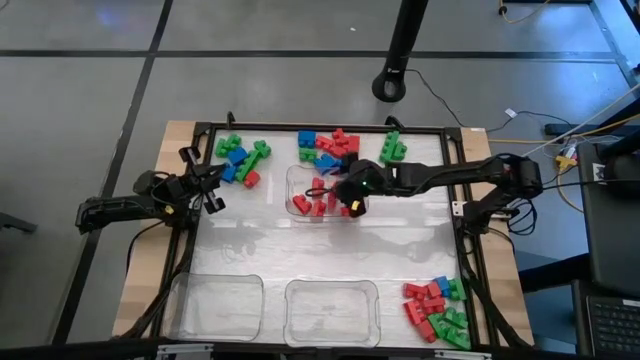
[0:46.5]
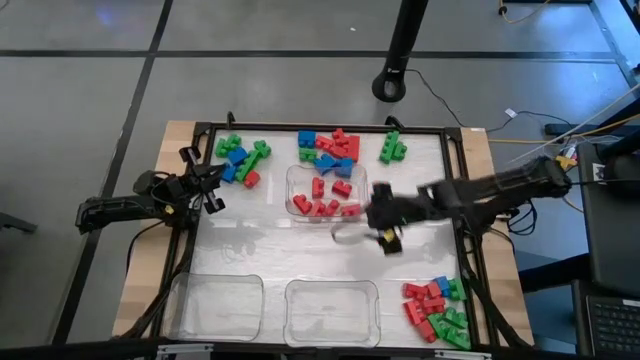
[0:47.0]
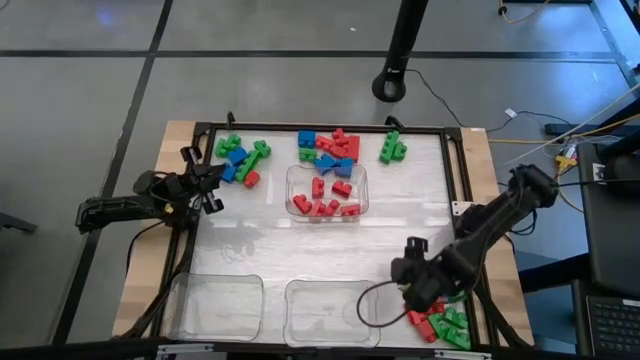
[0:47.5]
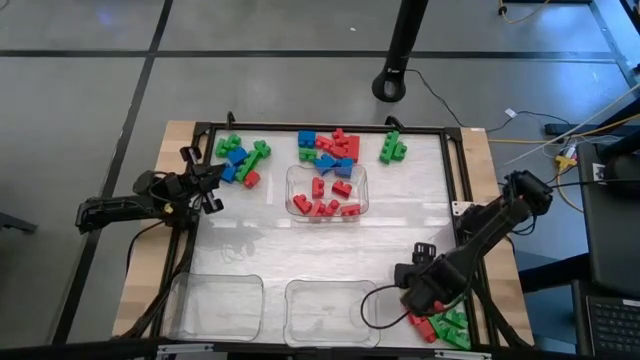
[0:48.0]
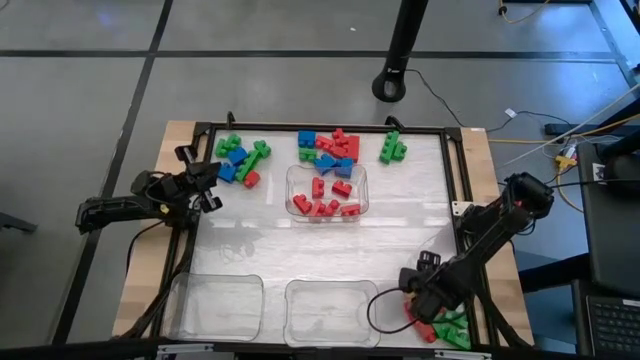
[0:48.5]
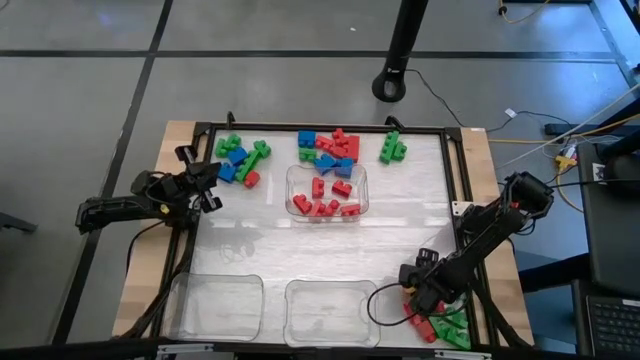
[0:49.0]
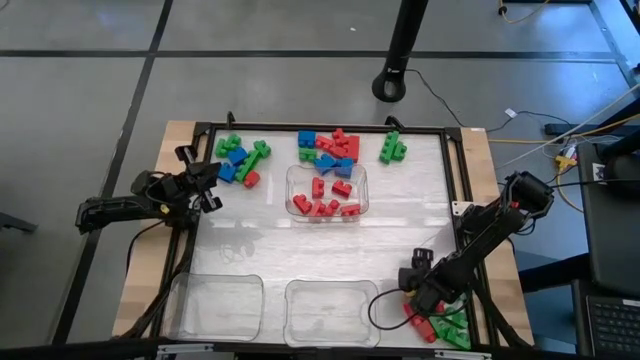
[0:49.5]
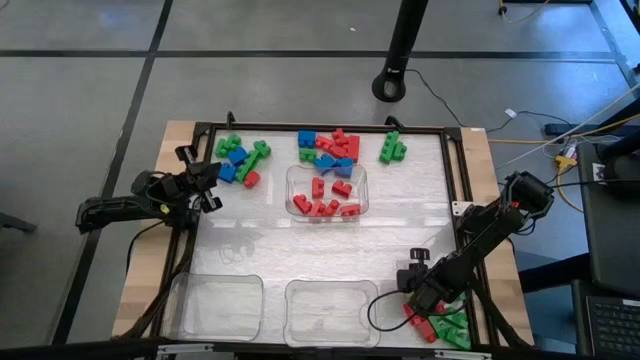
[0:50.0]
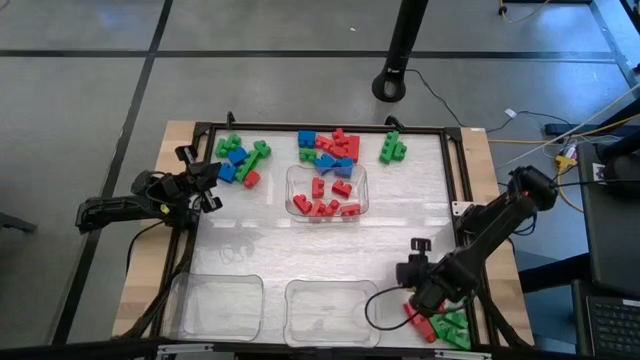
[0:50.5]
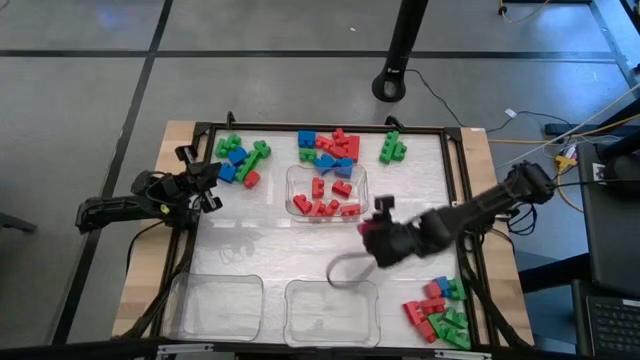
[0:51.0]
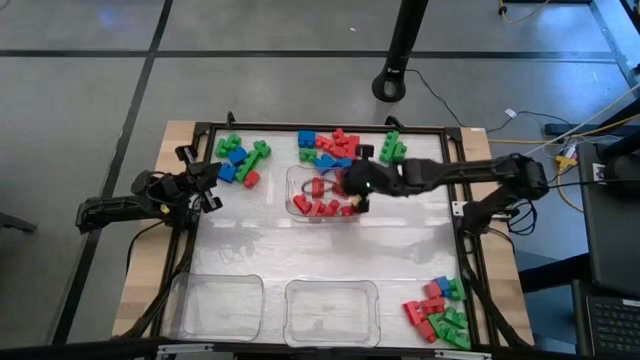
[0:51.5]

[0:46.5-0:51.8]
Task: Sort blocks
Put the red game piece into the top right transparent bin

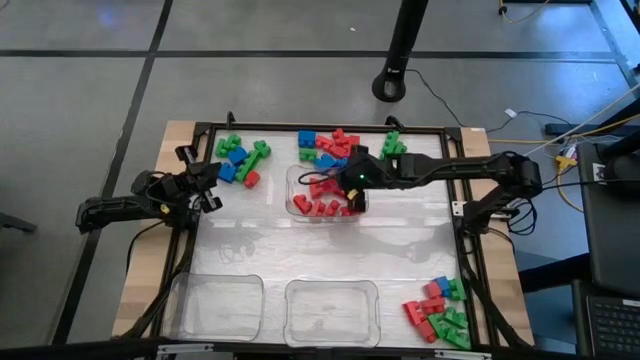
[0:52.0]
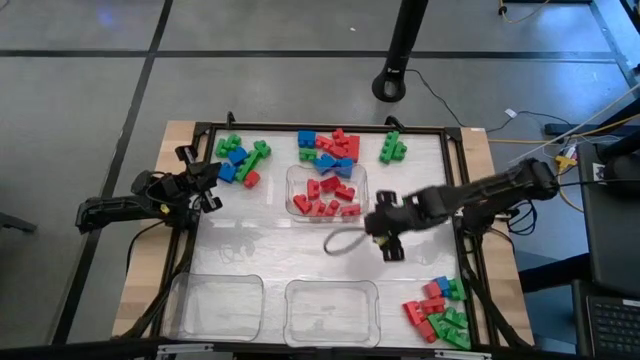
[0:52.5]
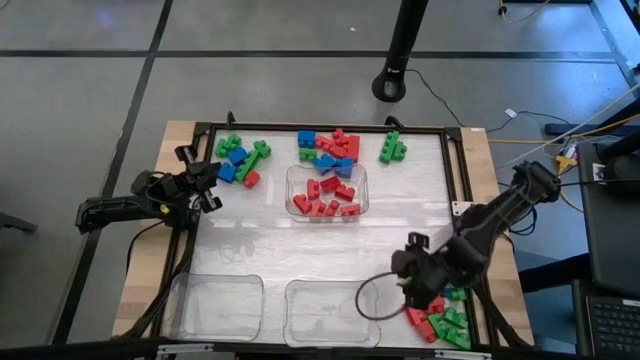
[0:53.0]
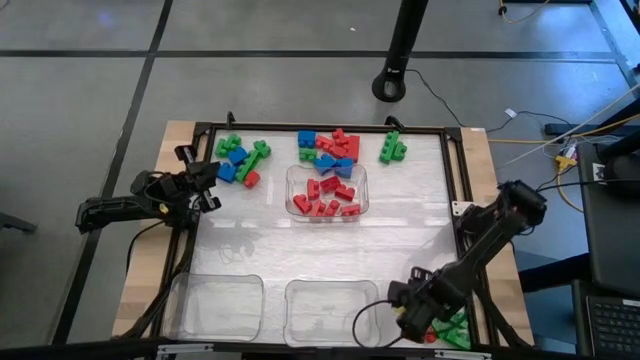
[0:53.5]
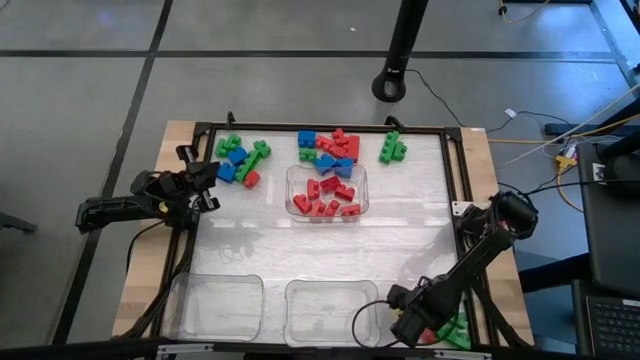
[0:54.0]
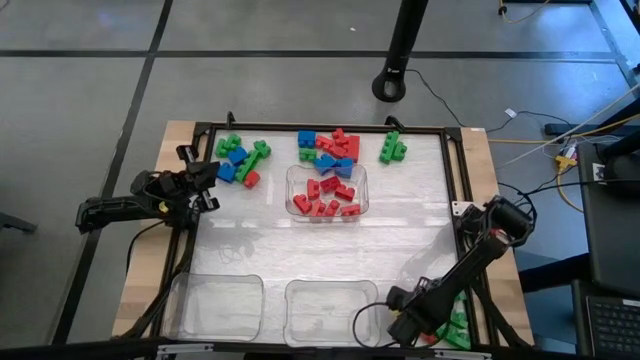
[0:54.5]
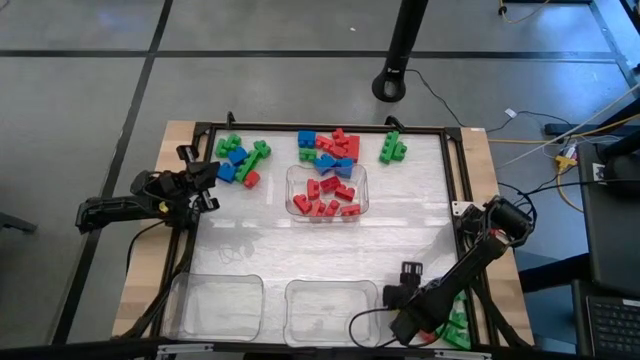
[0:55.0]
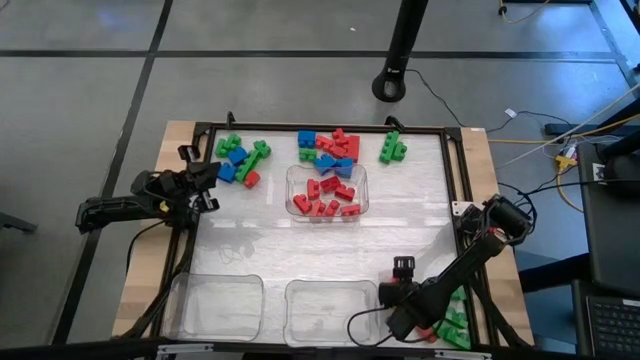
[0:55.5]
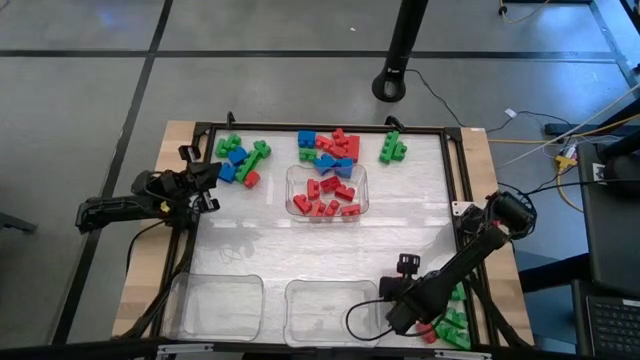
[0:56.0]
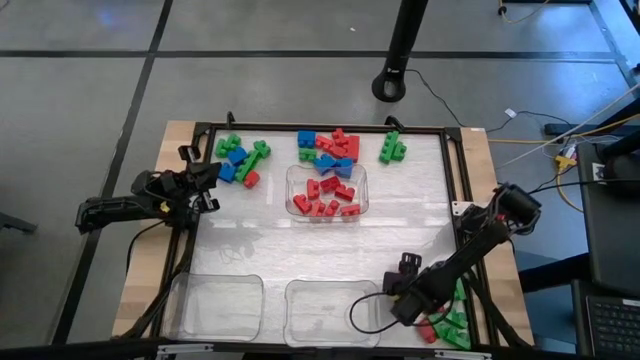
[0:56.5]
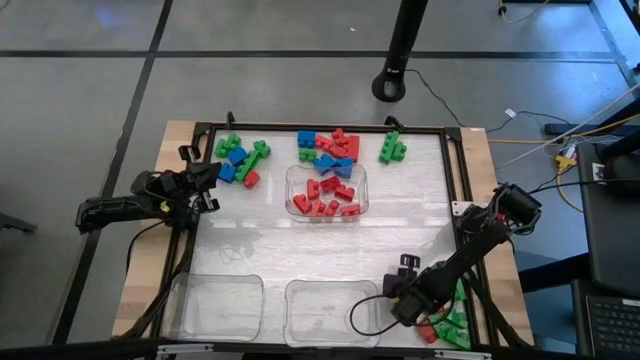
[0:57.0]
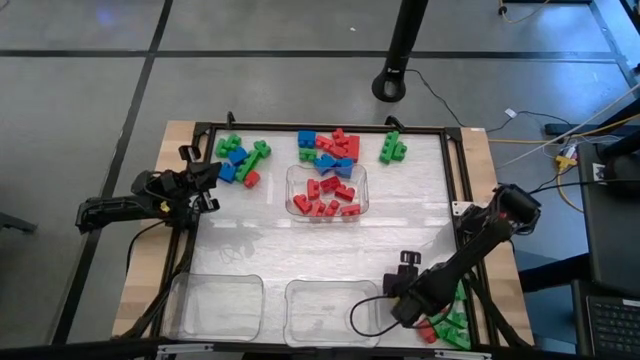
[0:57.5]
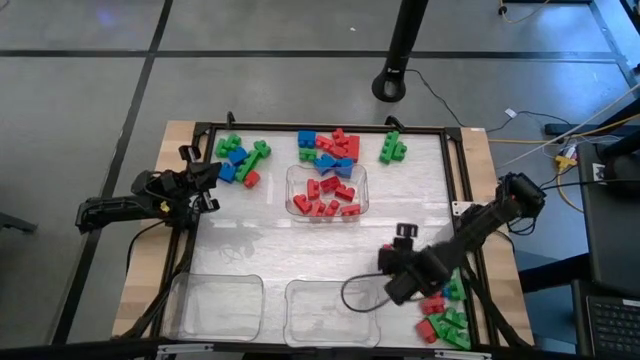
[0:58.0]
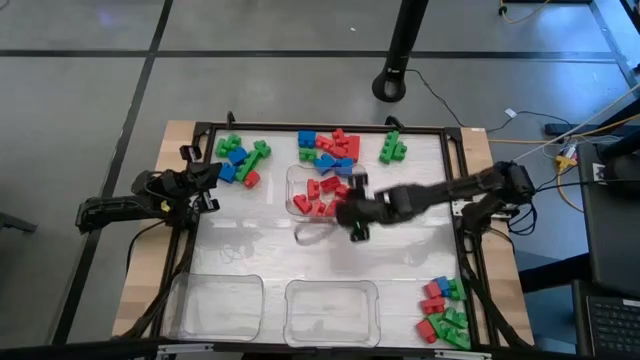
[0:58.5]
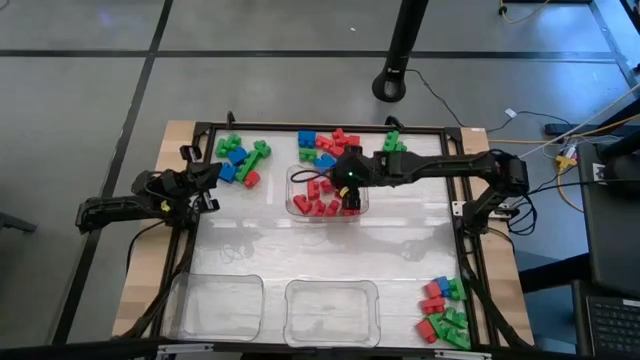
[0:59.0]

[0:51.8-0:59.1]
Put the red game piece into the top right transparent bin

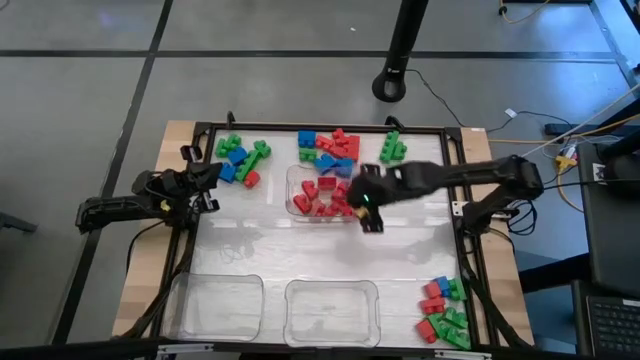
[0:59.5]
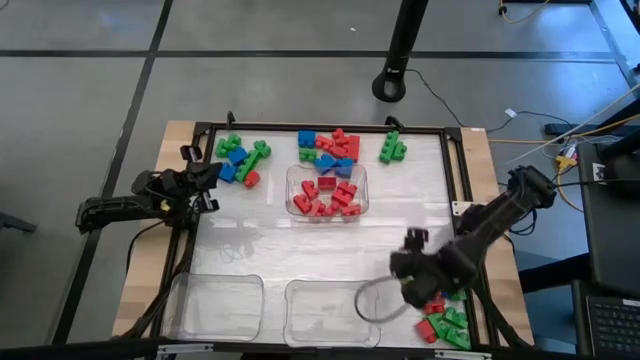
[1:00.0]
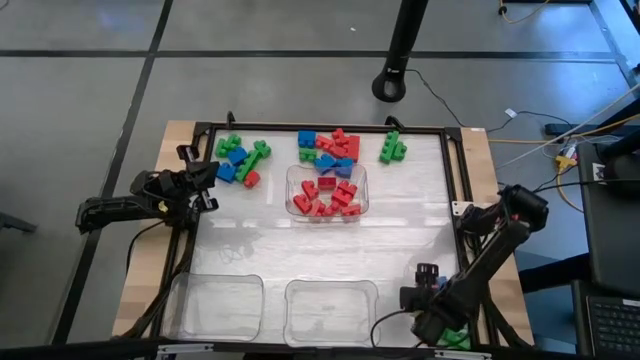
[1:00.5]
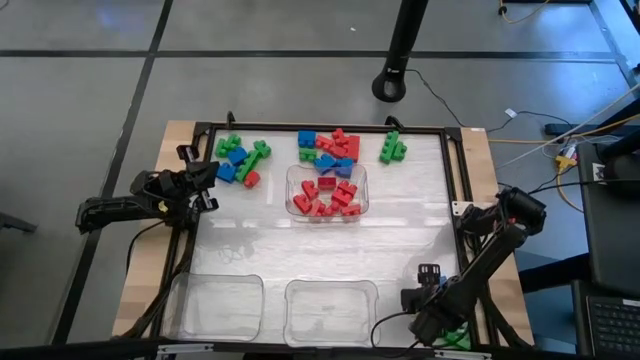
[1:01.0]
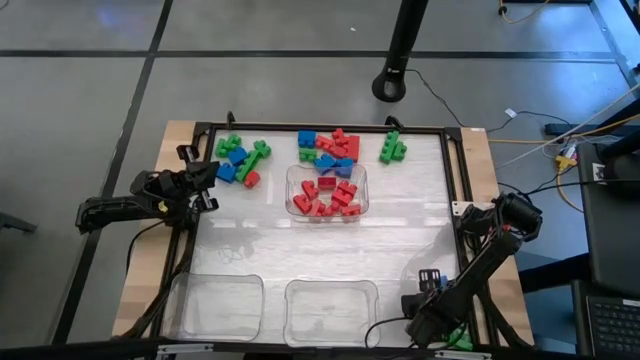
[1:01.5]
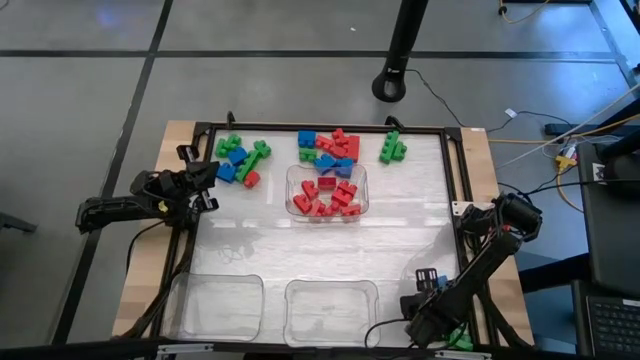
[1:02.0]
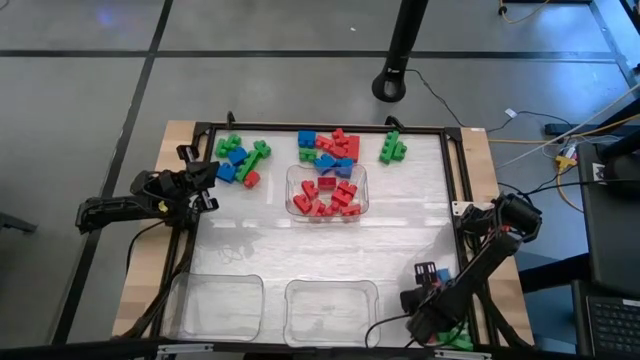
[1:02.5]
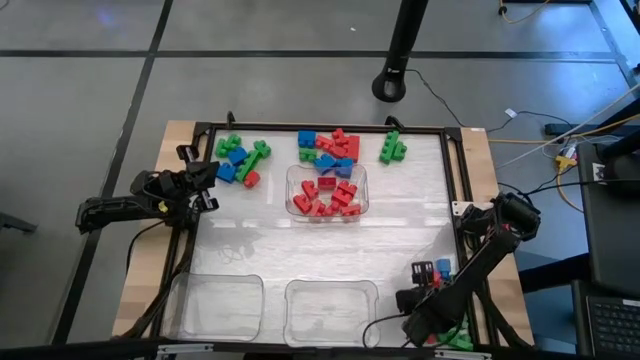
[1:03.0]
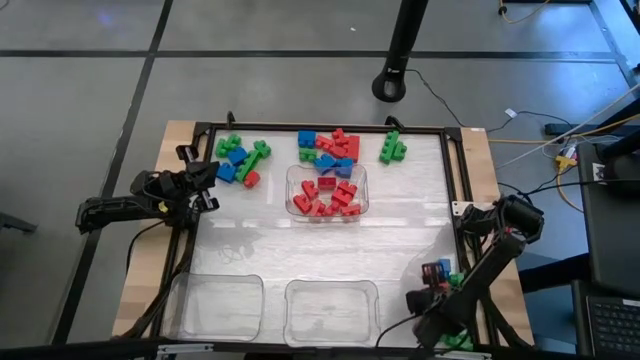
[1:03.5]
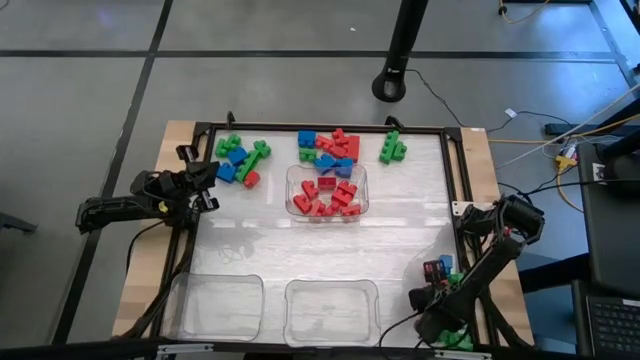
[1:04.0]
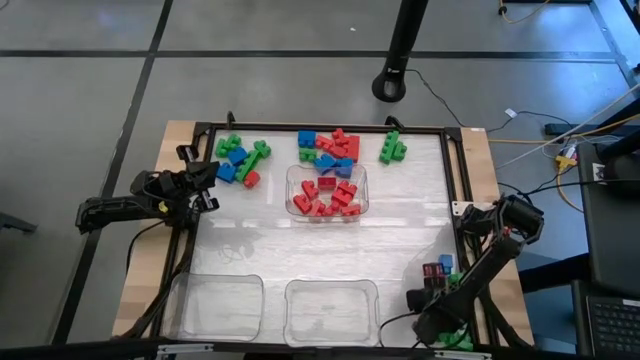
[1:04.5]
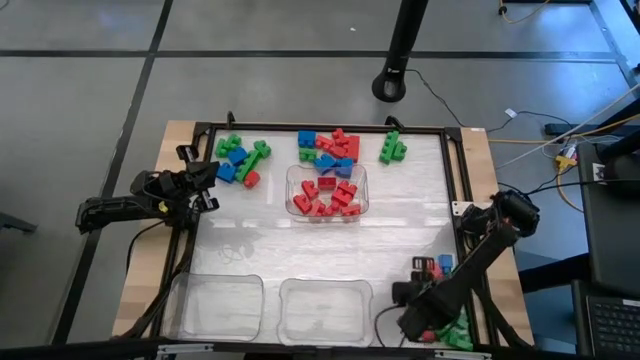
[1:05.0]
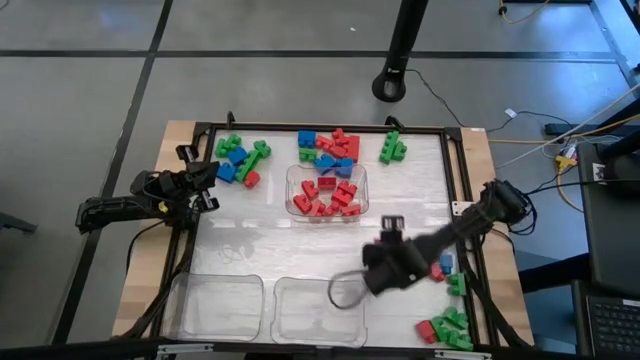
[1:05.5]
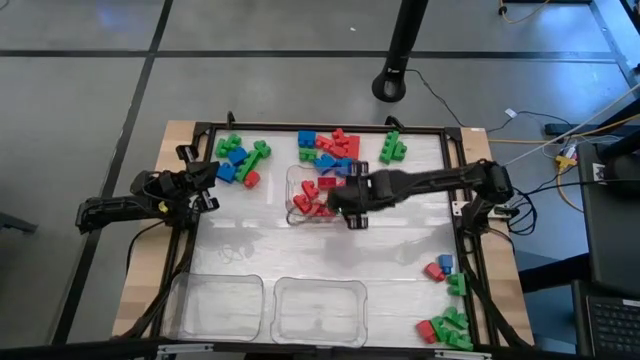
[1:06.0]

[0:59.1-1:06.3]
Put the red game piece into the top right transparent bin
